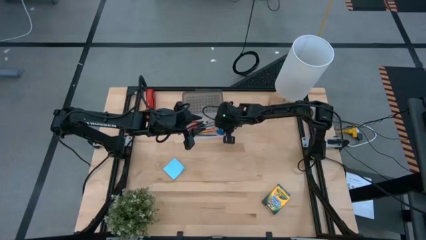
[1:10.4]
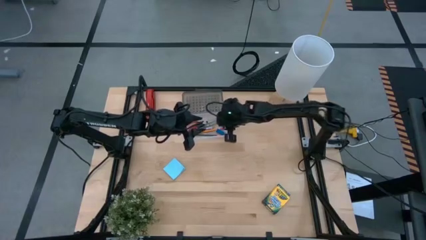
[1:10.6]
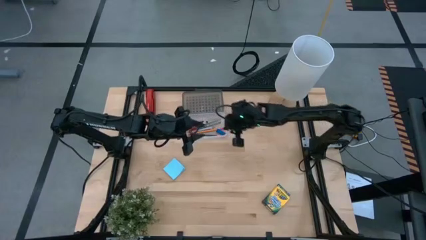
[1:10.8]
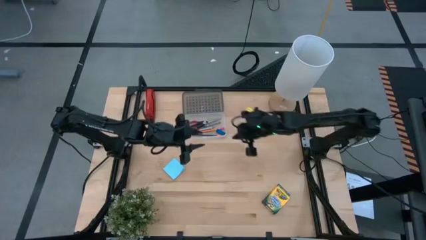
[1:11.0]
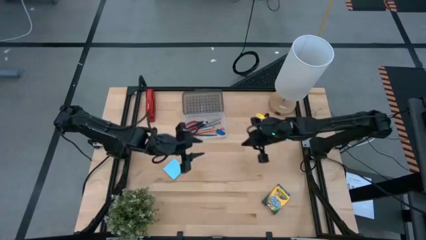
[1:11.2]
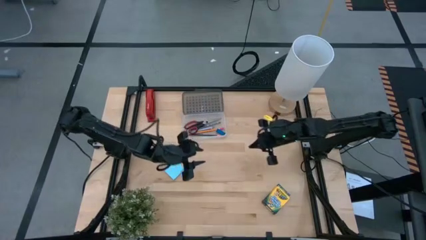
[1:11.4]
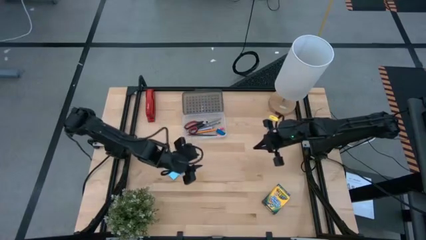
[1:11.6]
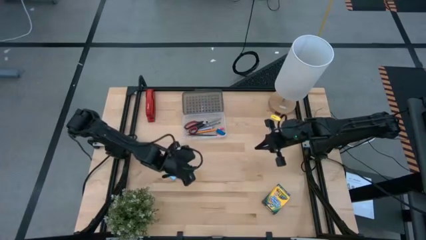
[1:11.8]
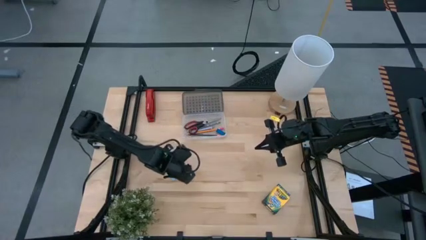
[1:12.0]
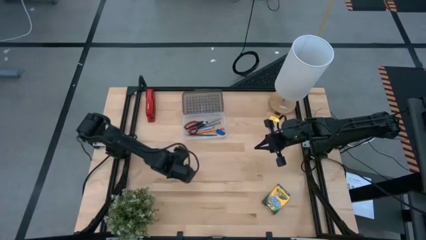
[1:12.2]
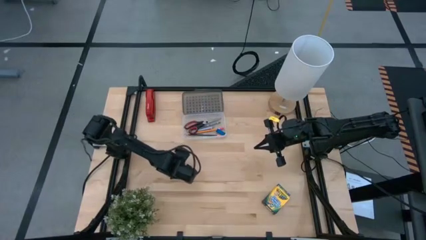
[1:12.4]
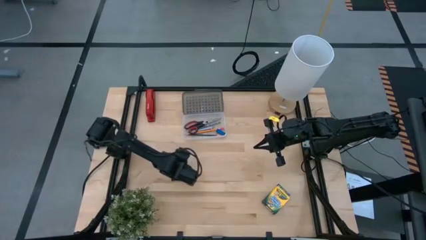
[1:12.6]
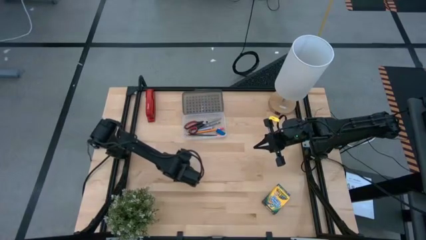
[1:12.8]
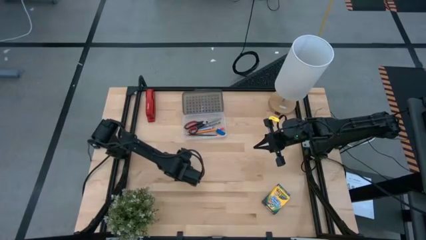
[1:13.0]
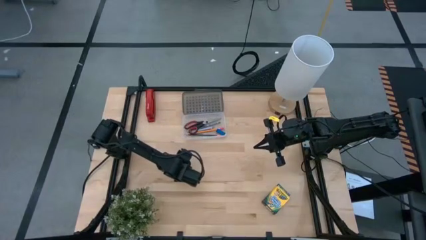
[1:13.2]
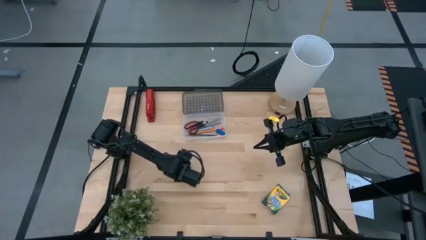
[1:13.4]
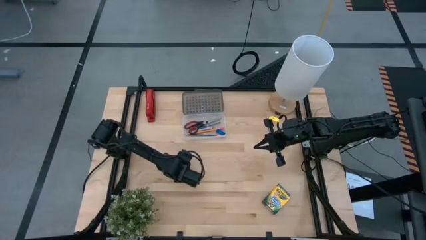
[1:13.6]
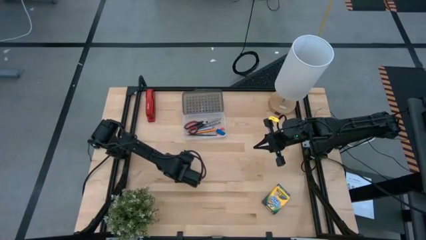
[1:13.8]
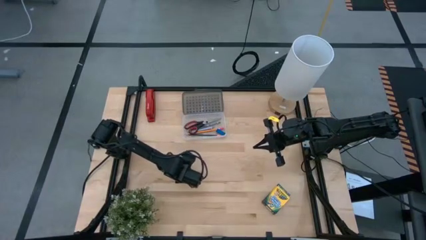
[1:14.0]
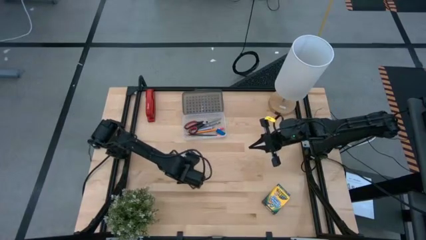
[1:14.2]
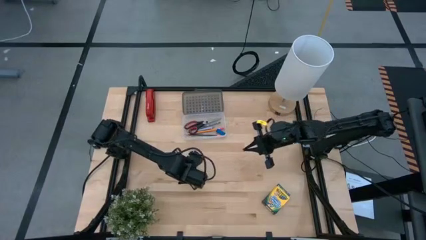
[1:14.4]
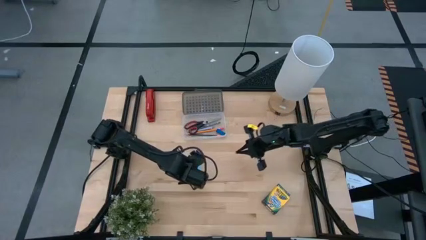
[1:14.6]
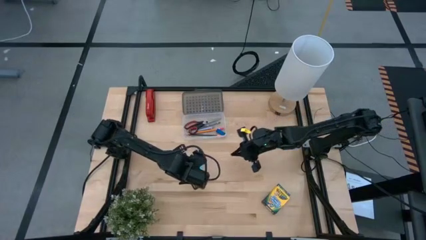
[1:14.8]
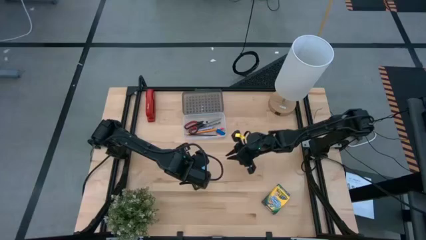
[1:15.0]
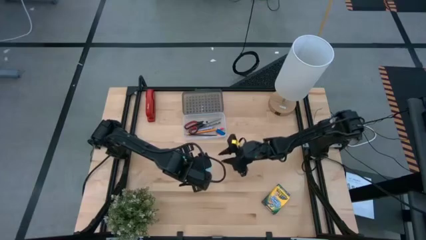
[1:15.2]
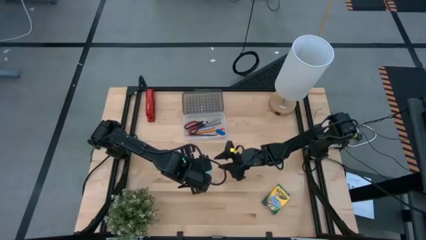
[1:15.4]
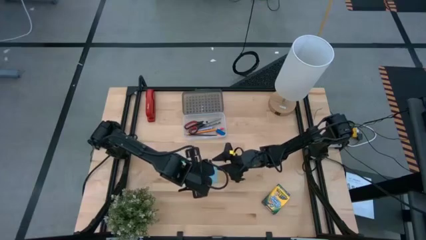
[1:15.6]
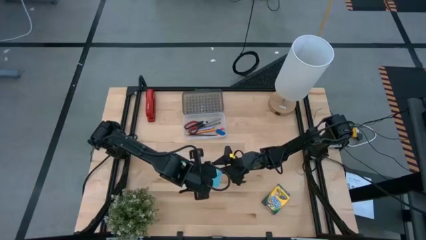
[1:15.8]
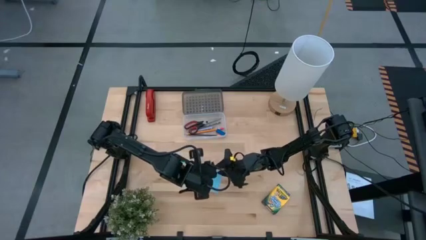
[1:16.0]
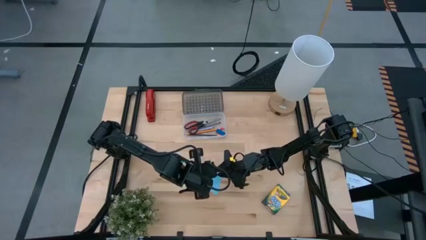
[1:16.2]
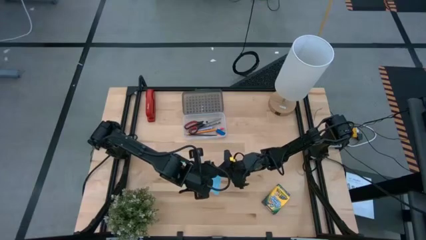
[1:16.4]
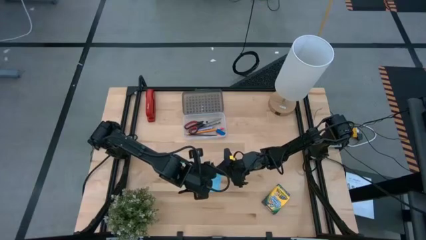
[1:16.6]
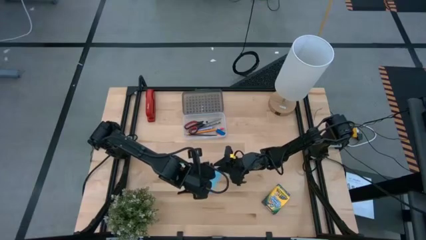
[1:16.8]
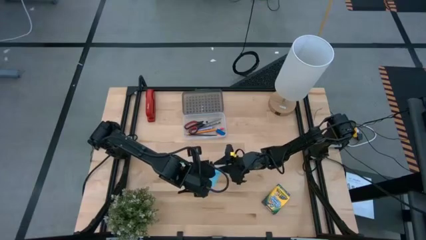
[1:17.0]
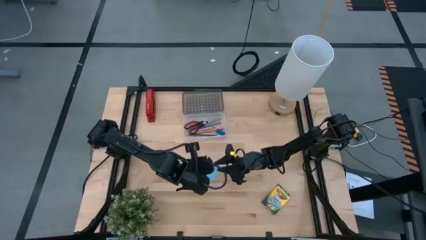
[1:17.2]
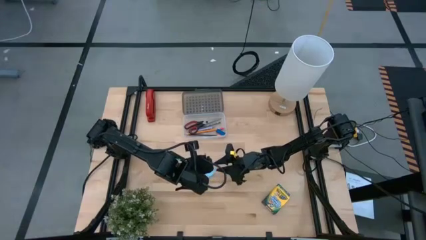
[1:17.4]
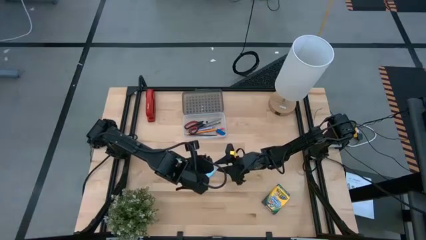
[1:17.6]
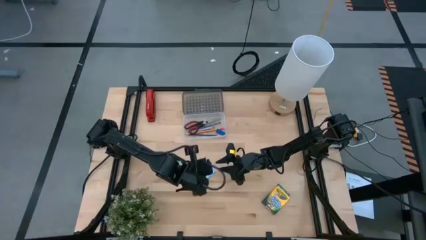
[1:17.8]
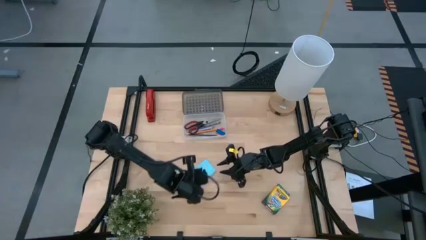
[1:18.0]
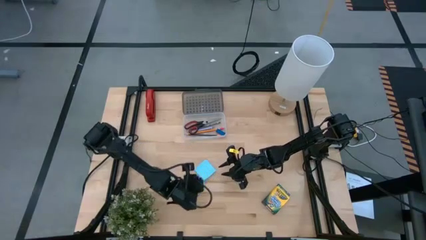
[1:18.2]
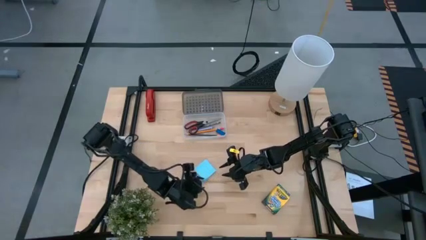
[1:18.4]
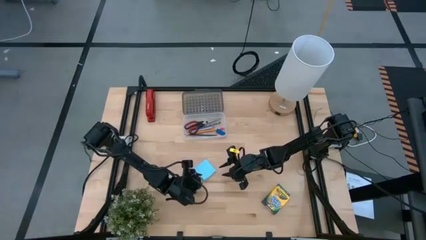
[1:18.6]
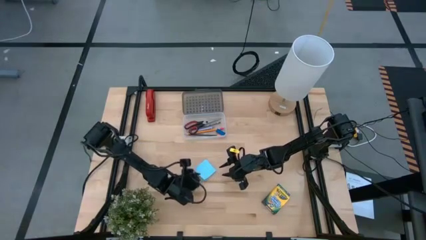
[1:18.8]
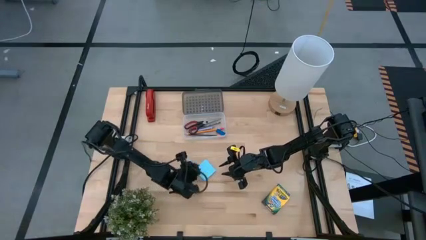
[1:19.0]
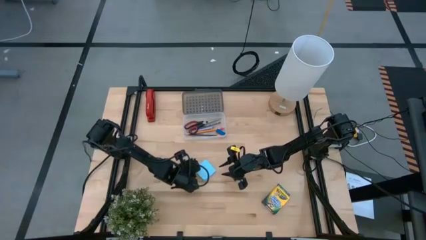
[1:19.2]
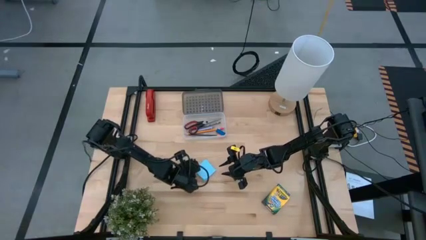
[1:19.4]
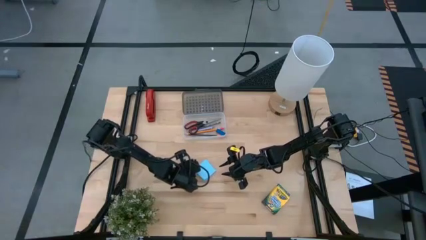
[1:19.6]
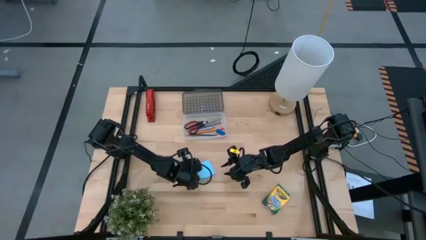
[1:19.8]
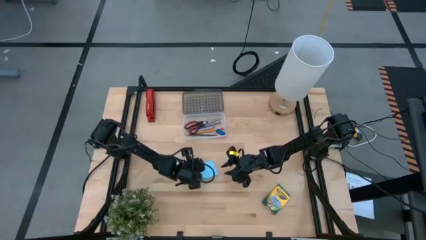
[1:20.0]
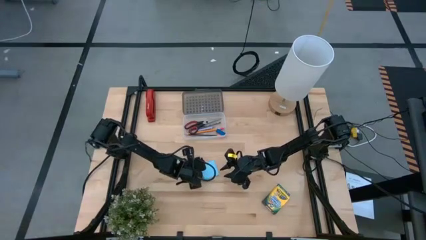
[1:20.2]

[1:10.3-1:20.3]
Task: Pack school essentials
Put the blue sticky note into the black supply box

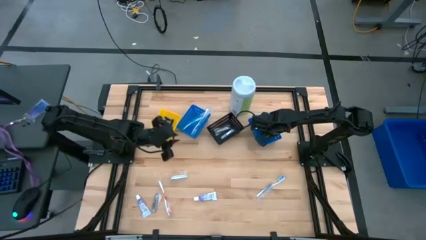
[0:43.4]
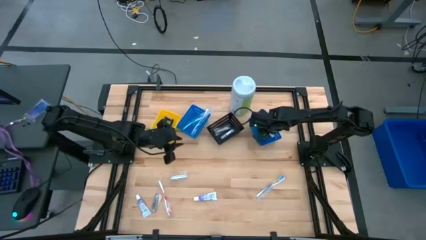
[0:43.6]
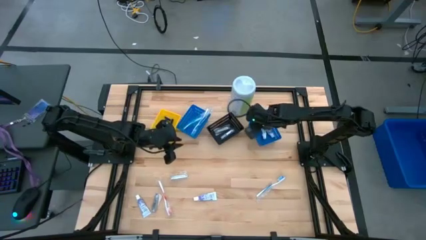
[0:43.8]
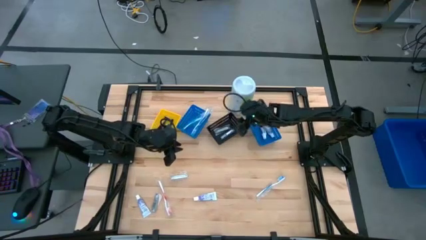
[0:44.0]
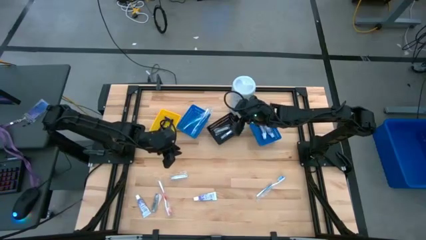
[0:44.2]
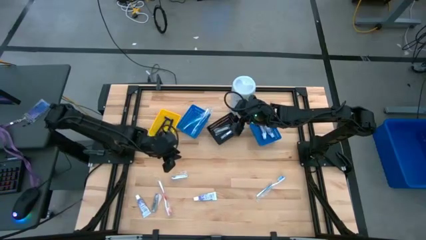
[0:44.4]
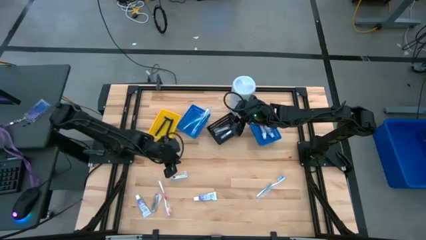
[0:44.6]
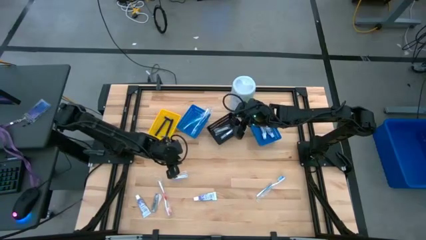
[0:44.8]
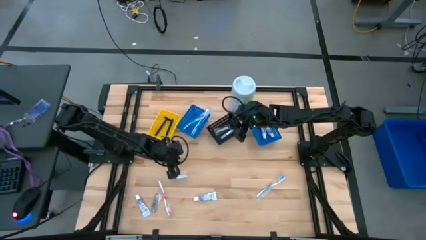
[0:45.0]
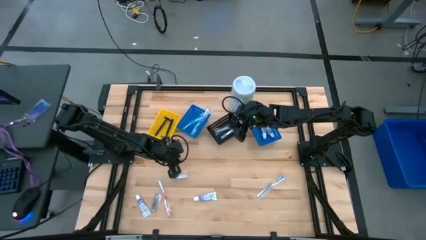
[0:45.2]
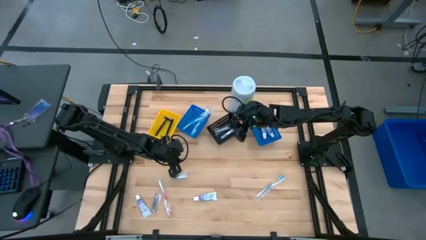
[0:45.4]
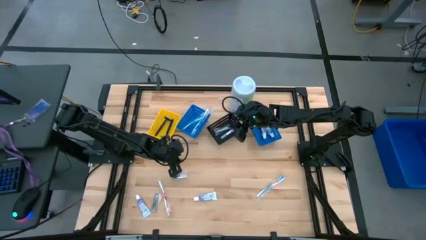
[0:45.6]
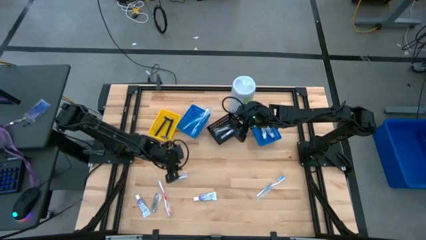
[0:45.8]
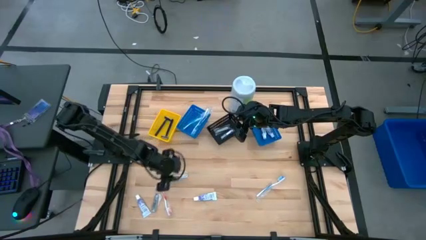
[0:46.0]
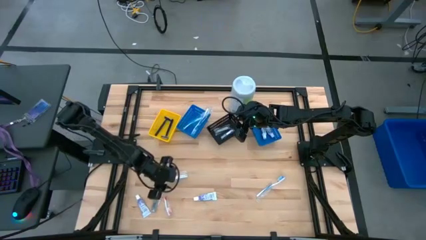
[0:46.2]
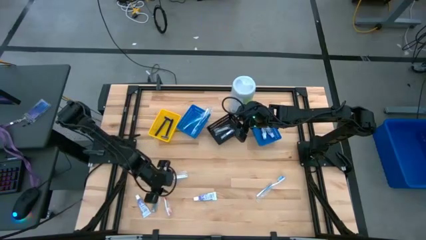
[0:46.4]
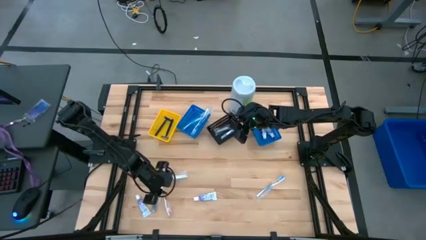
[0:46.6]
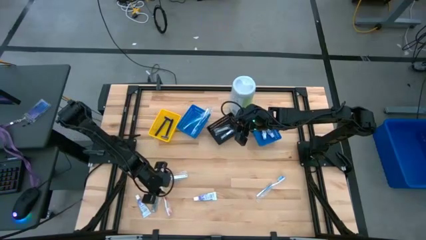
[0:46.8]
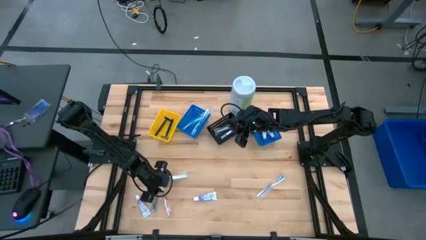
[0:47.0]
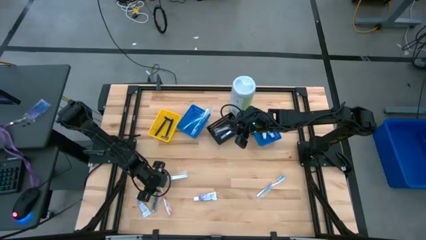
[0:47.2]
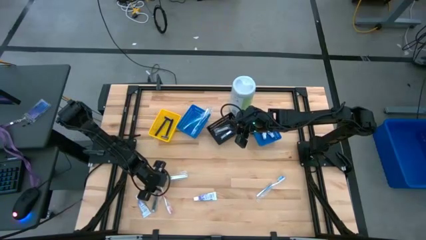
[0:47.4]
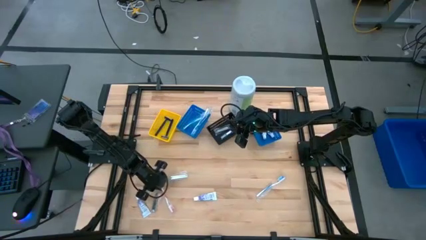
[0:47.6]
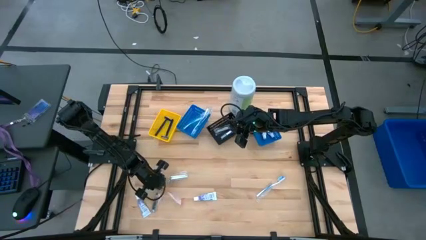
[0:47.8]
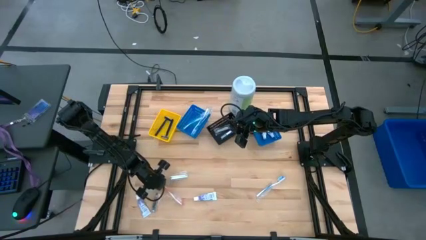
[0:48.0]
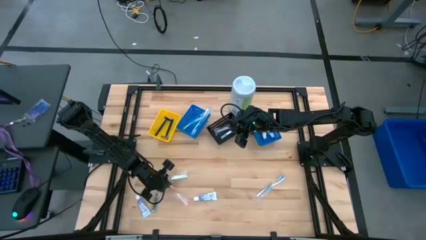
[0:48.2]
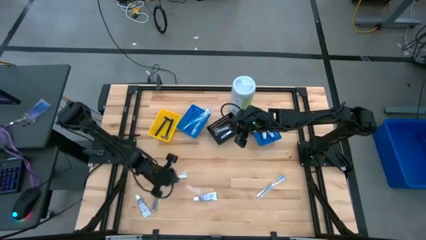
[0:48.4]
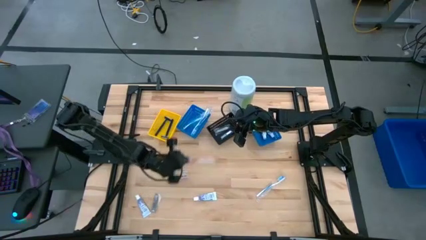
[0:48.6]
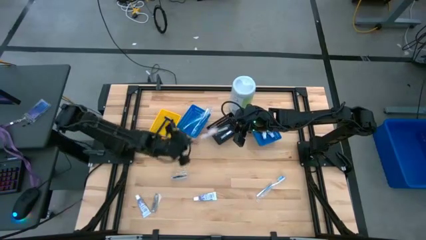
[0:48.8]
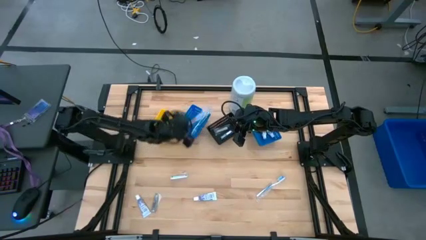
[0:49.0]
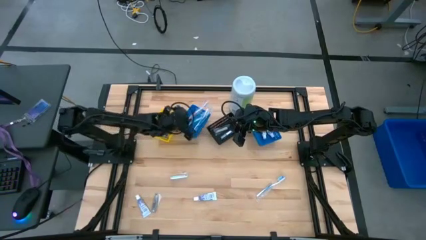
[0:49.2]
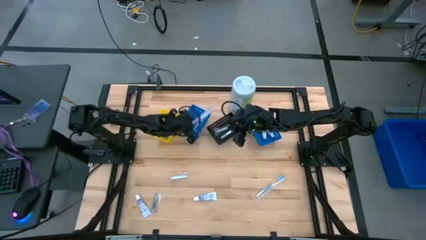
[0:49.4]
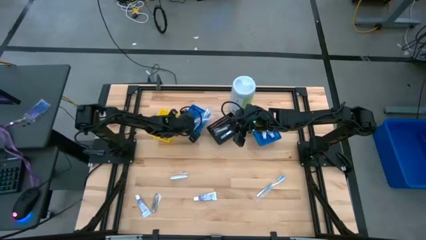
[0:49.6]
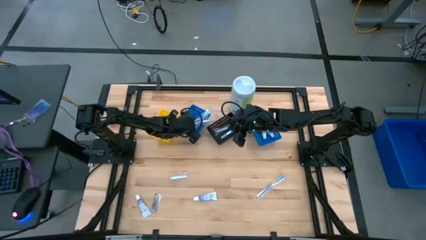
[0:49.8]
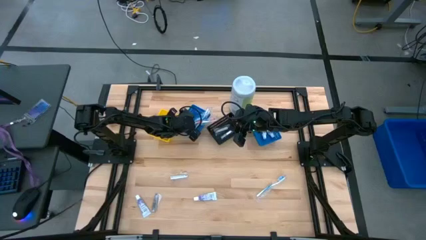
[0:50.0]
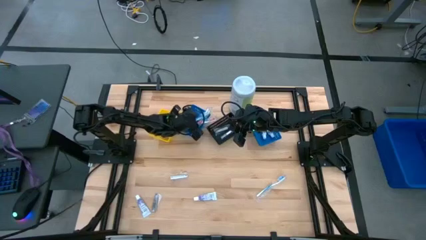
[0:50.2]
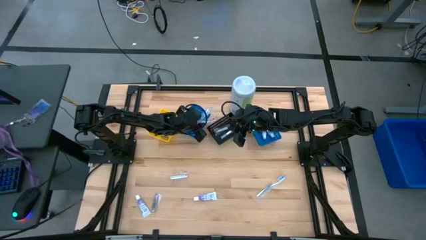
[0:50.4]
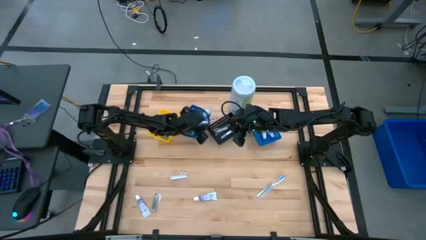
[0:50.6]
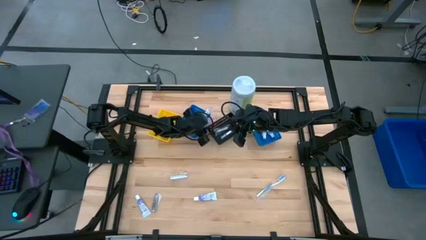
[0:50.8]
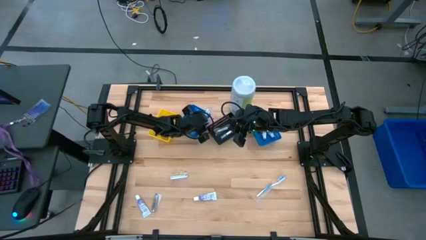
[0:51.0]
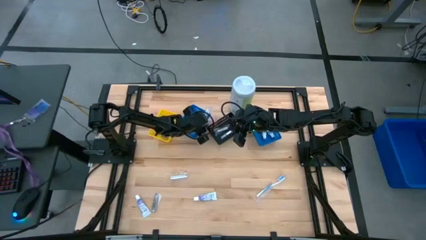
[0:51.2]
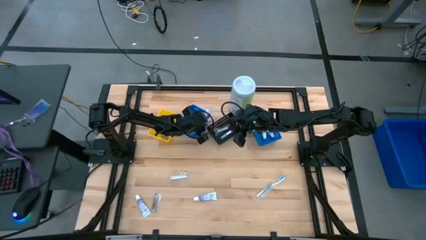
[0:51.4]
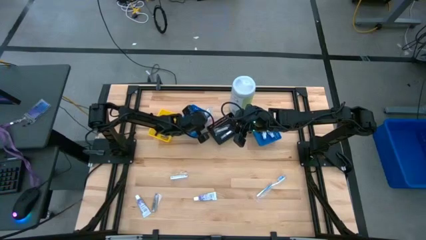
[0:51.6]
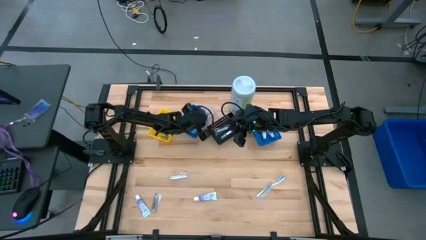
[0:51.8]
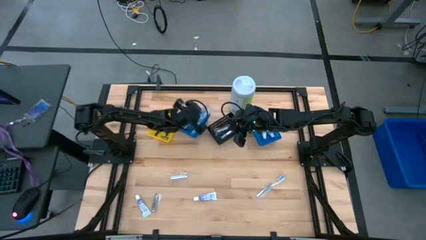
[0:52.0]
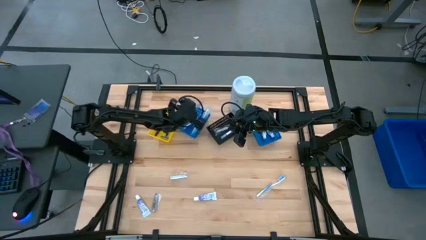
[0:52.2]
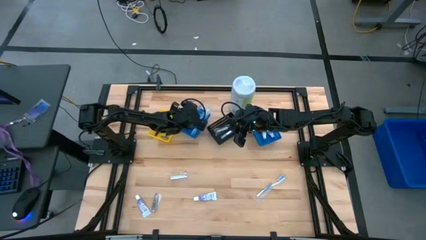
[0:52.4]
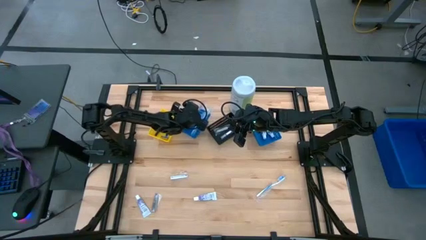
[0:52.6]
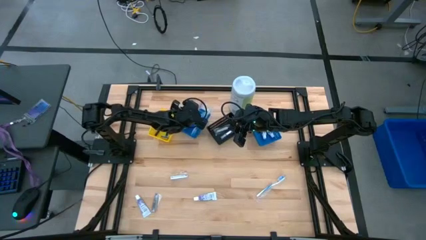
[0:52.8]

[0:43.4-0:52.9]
Task: Pick & Place Travel size toiletries
Put the orange toothbrush into the left blue basket
